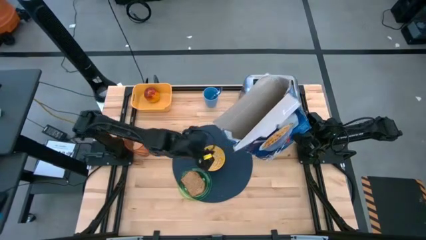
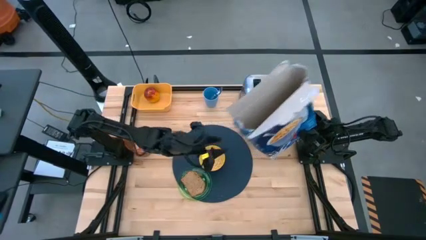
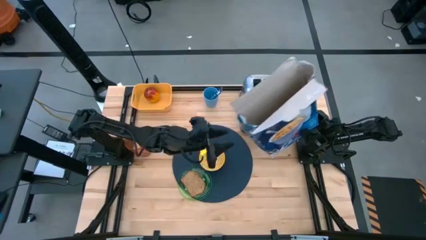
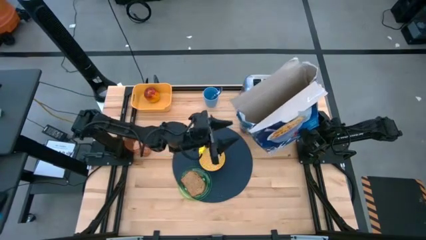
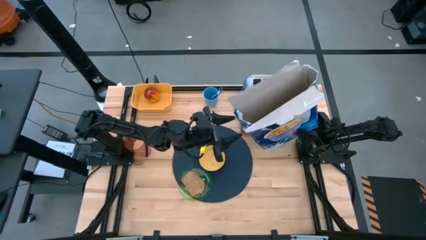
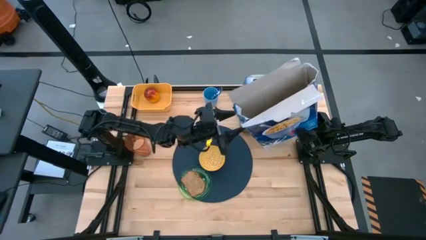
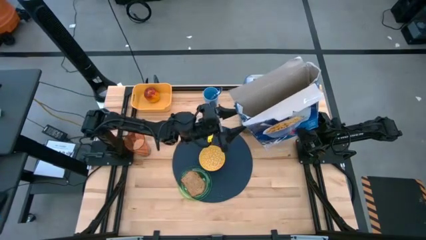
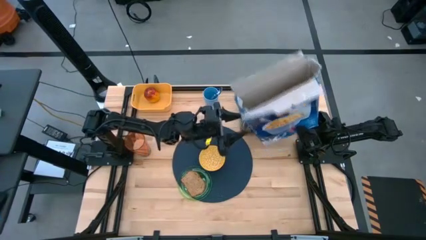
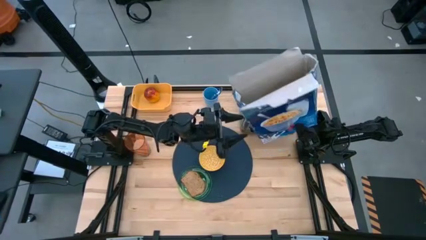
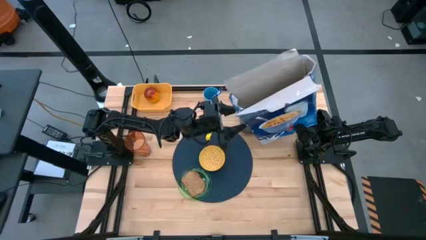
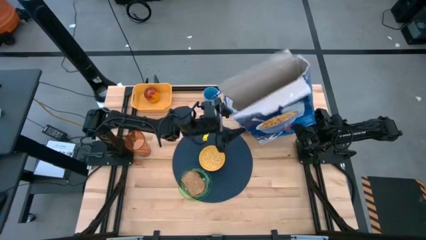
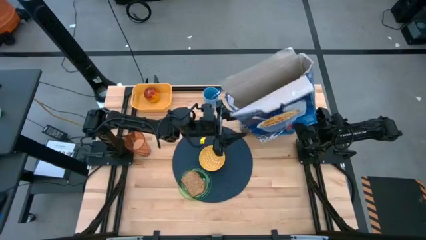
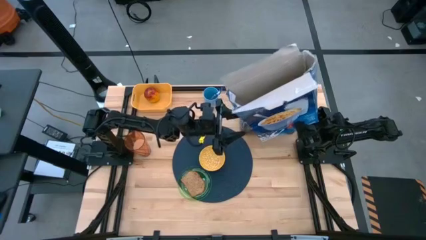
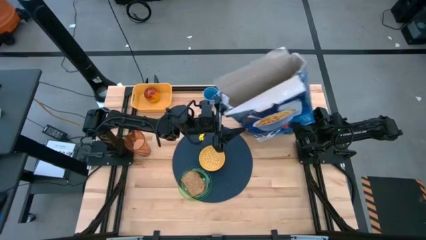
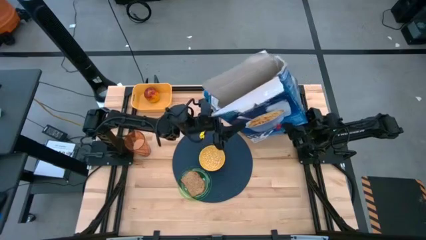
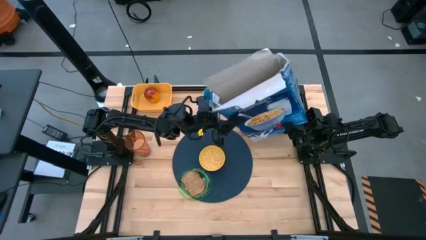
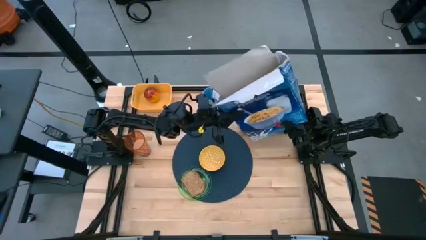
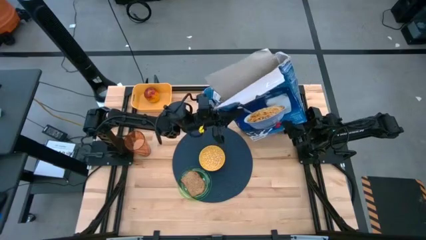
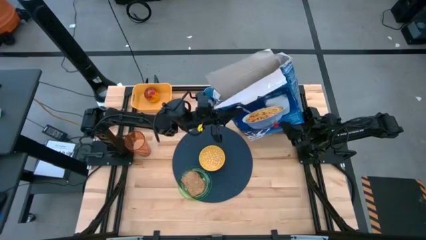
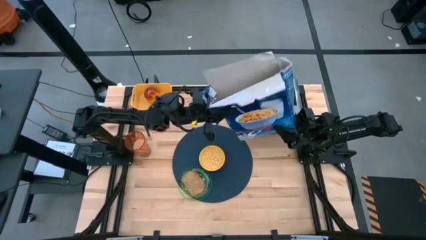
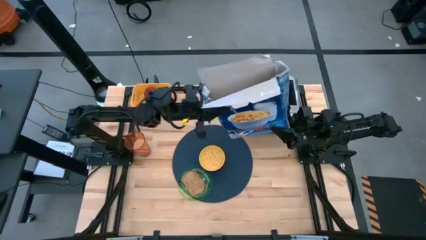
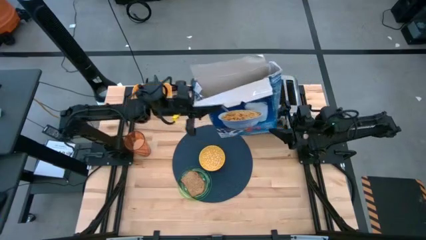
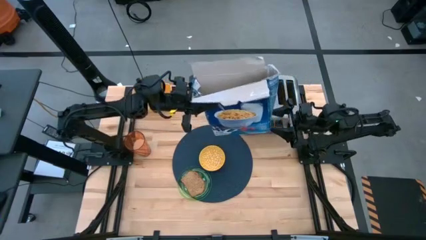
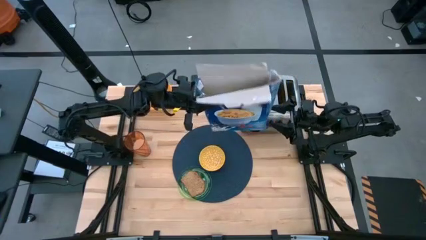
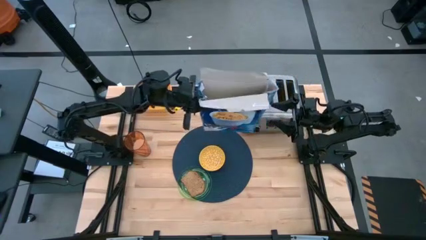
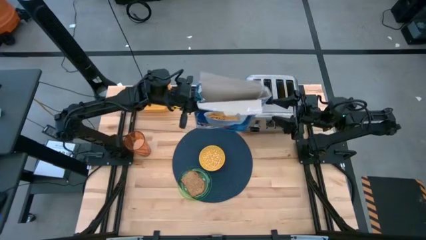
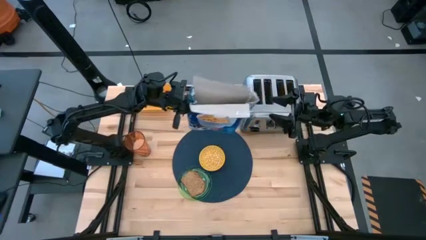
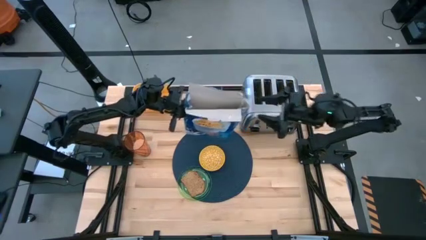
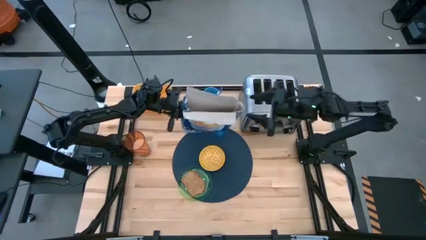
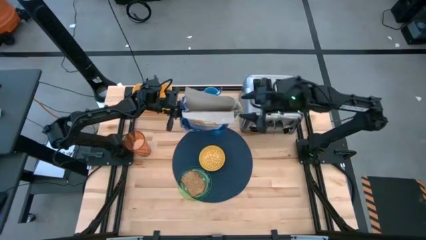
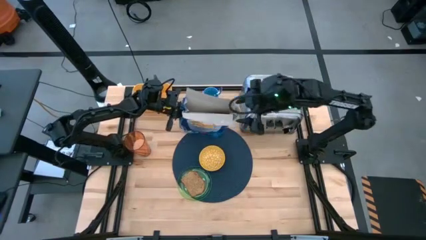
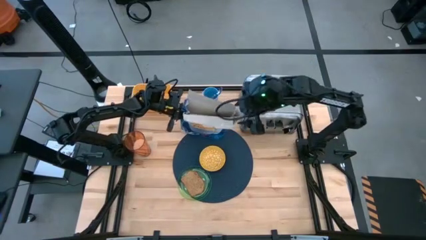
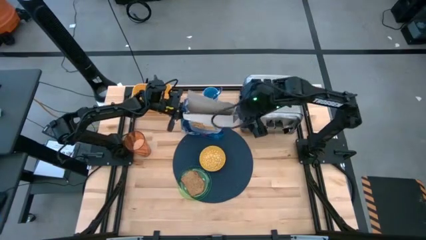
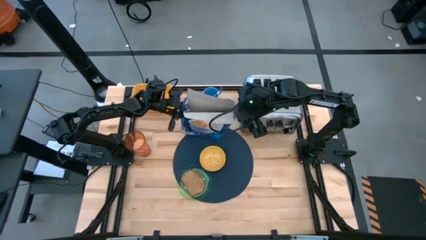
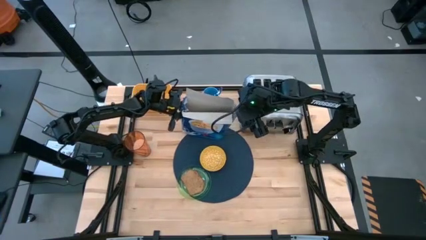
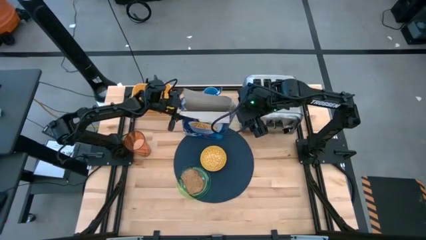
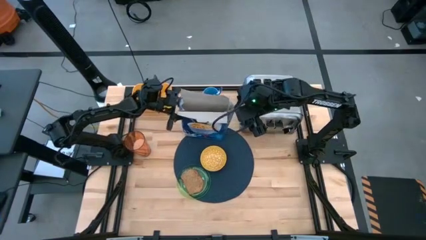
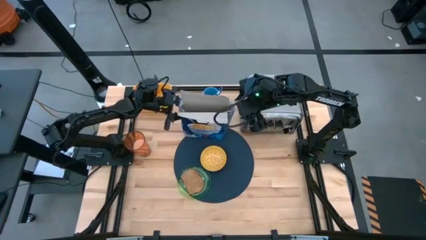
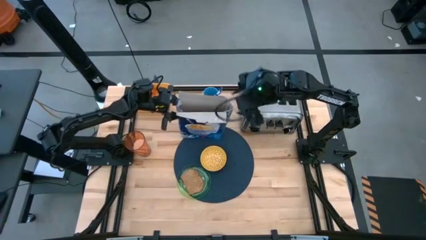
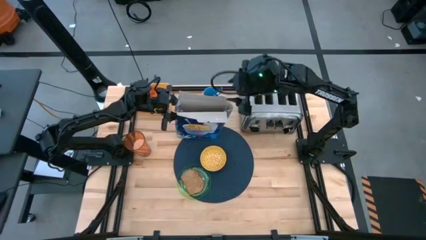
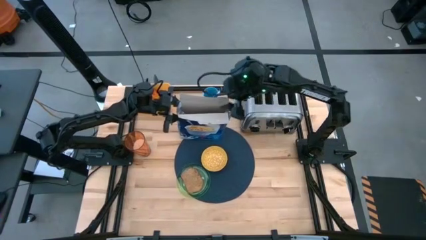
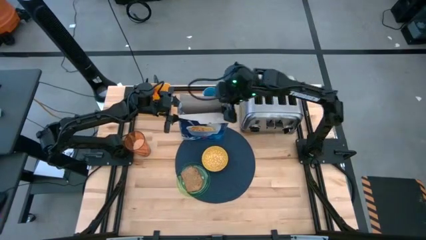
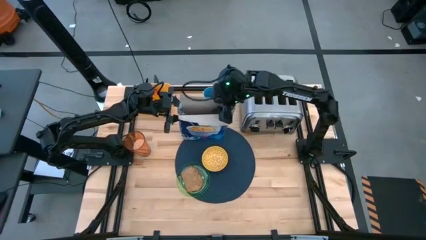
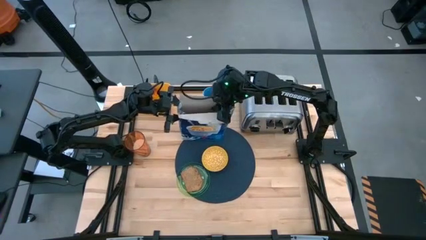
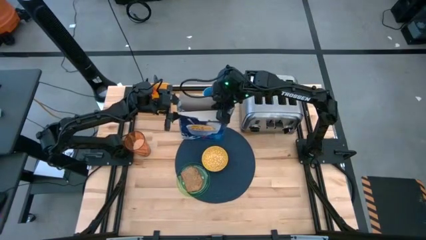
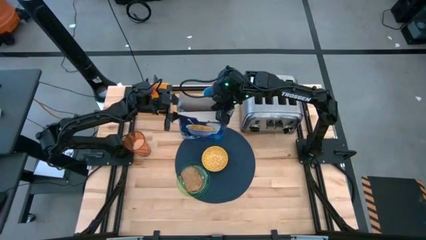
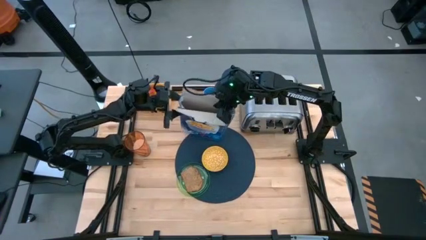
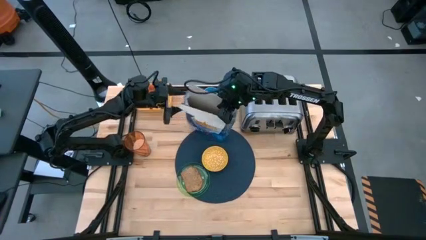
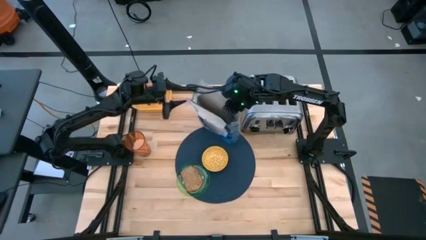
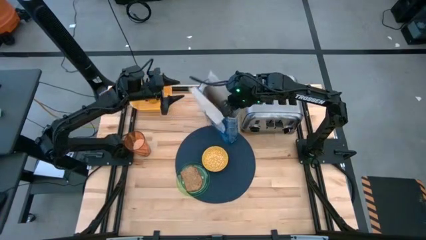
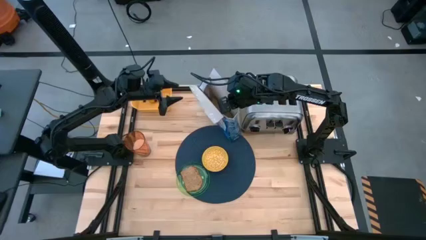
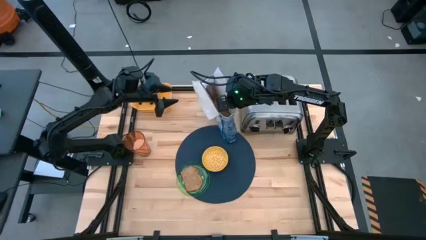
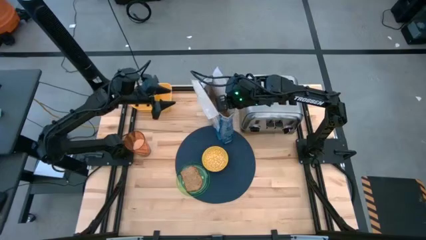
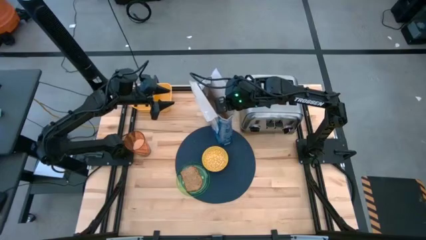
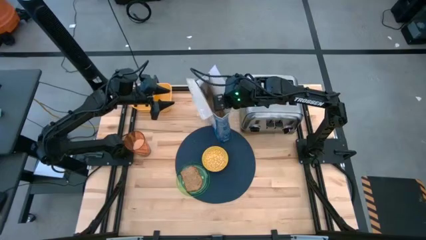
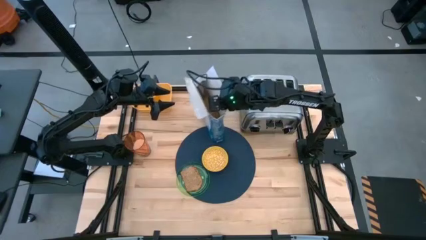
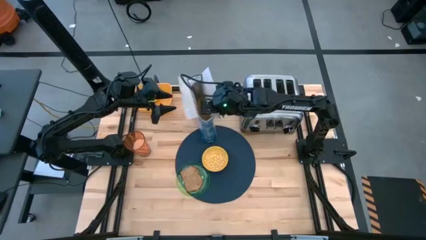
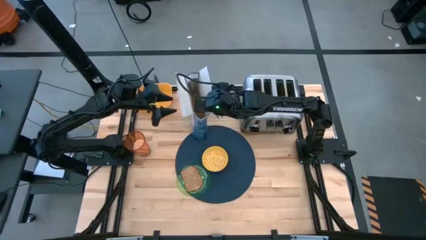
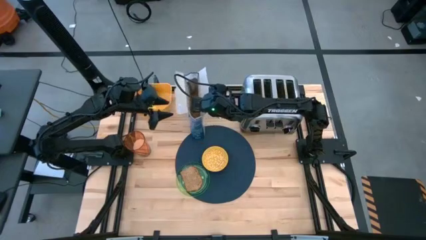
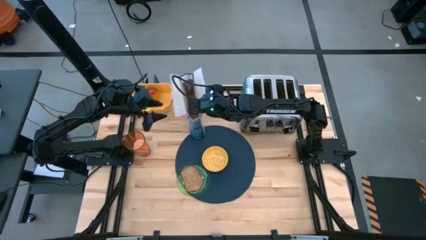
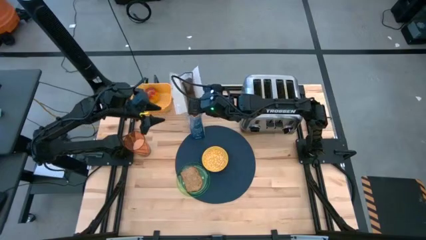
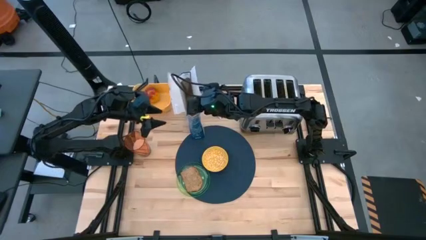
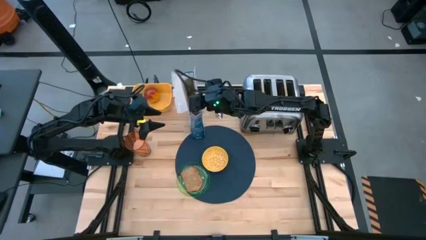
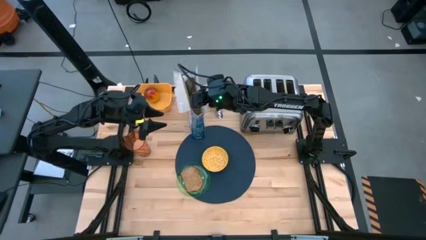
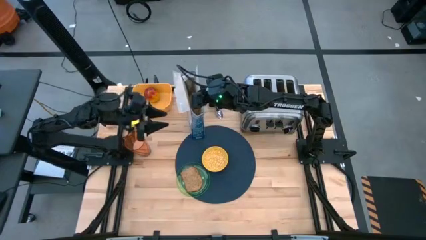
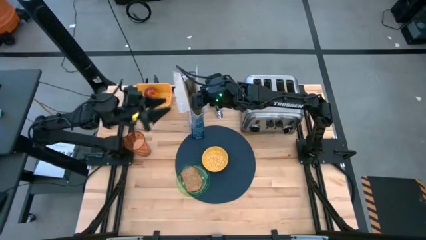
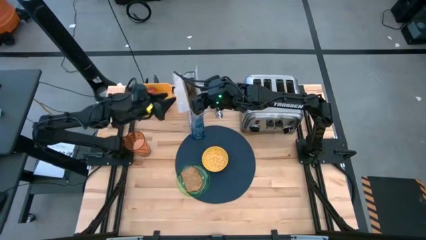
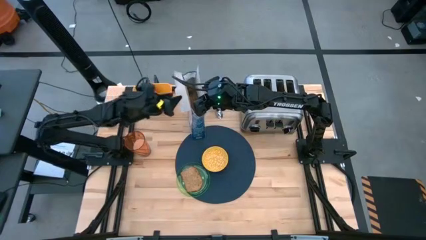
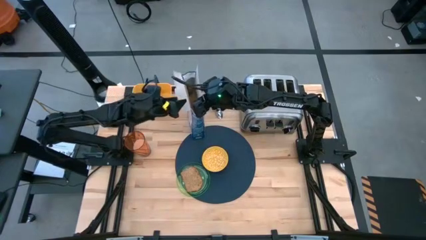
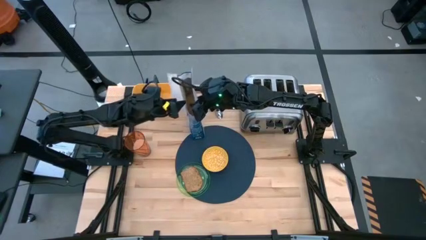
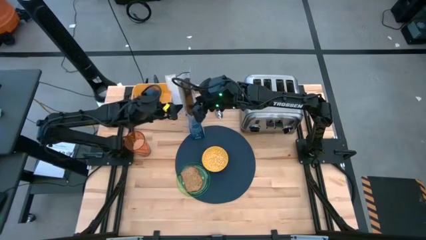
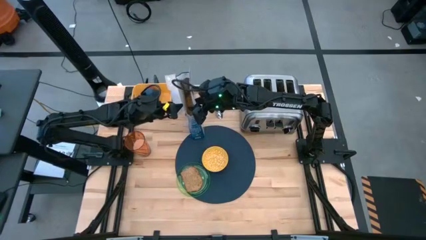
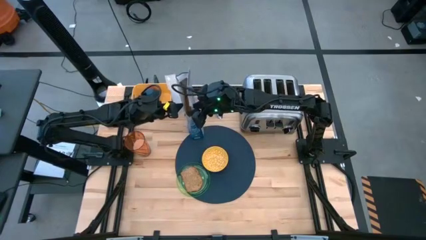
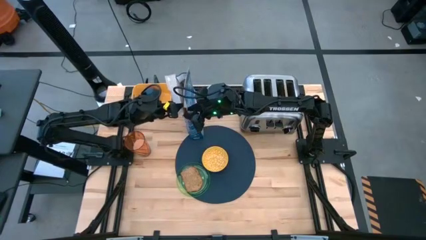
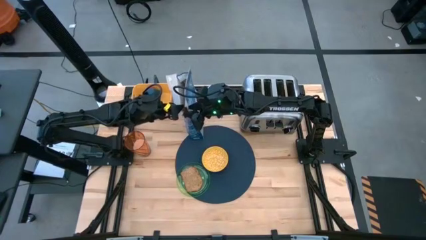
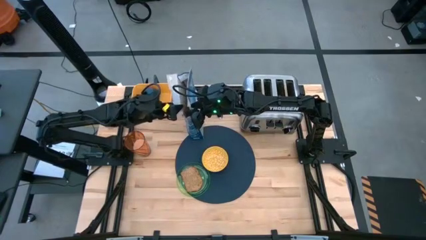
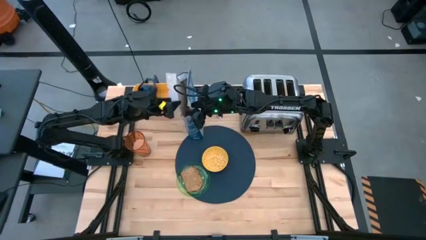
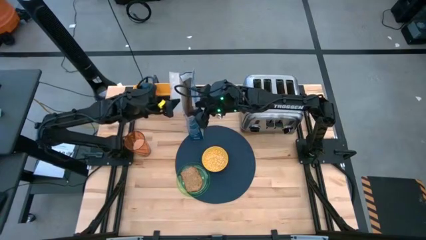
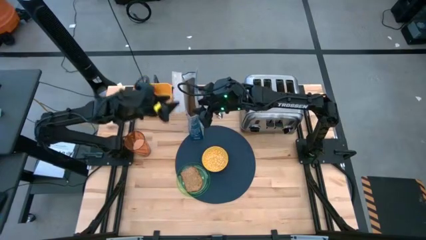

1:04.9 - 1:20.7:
Task: Arrange a breakfast setting
Pour the cereal in the yellow bowl on the dark blue table mat
